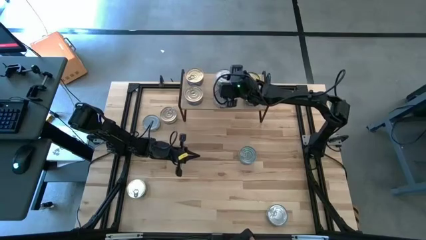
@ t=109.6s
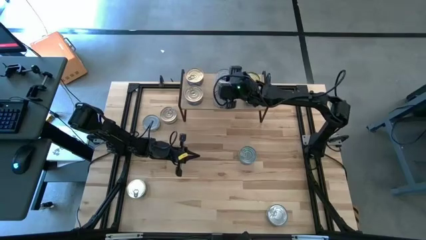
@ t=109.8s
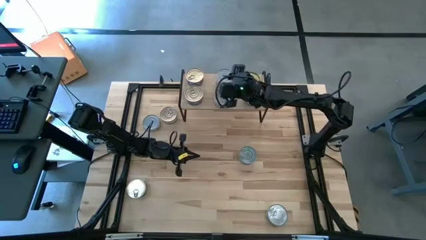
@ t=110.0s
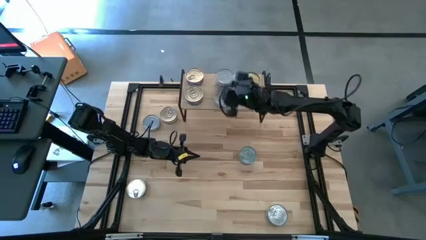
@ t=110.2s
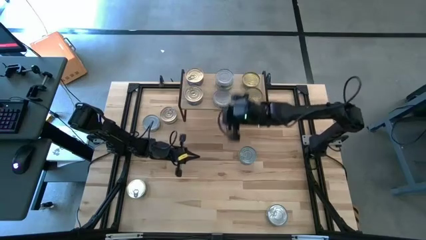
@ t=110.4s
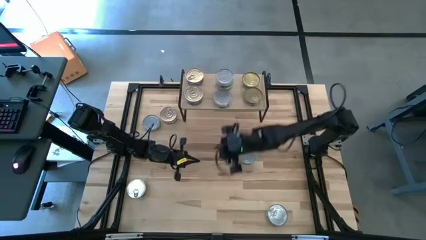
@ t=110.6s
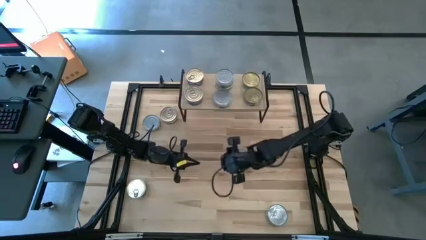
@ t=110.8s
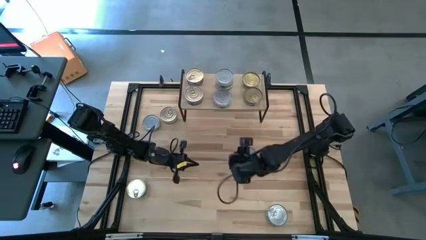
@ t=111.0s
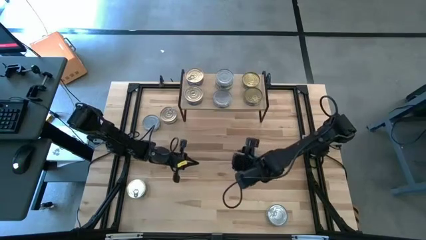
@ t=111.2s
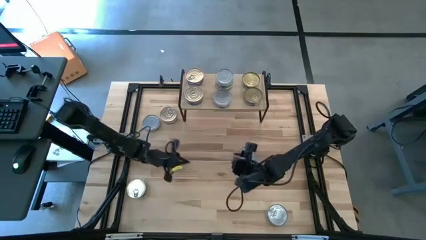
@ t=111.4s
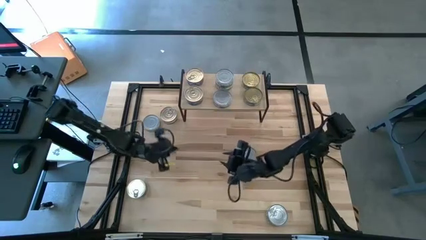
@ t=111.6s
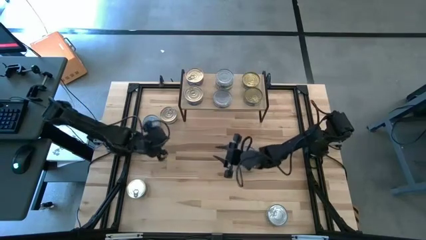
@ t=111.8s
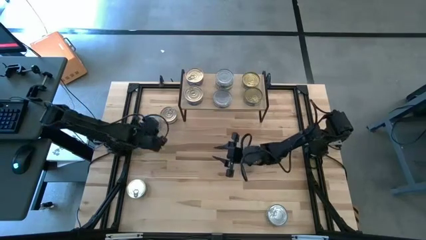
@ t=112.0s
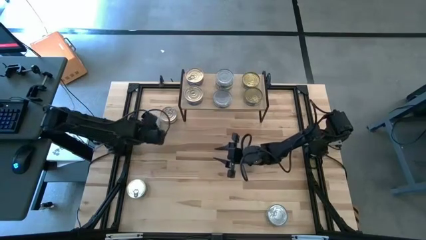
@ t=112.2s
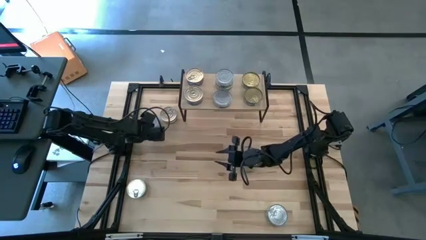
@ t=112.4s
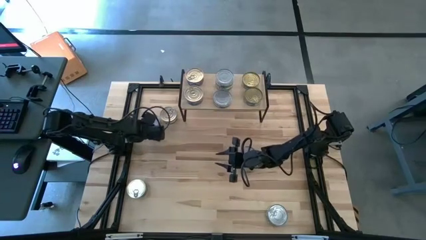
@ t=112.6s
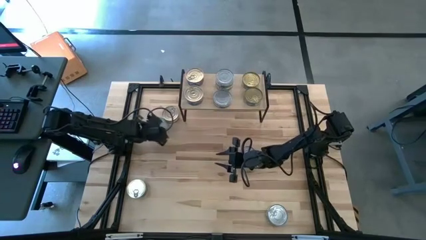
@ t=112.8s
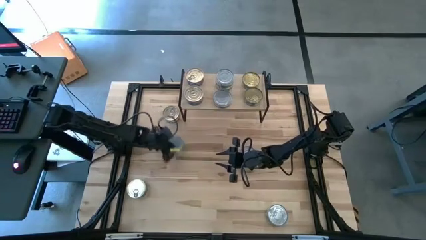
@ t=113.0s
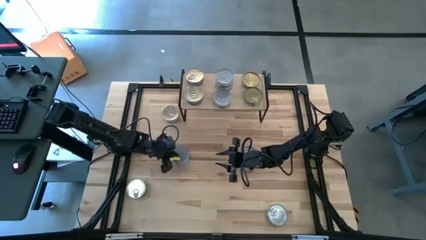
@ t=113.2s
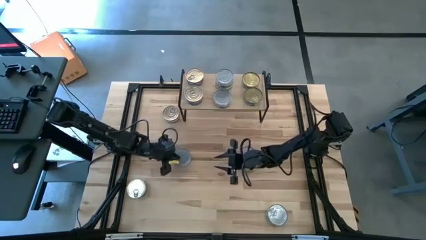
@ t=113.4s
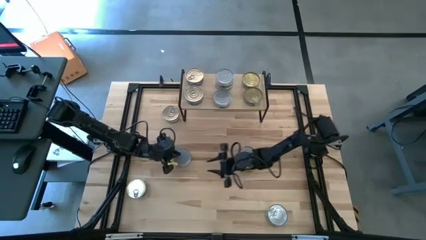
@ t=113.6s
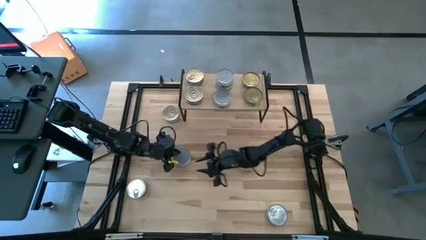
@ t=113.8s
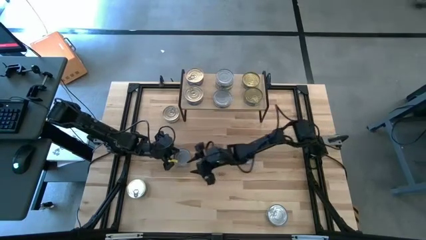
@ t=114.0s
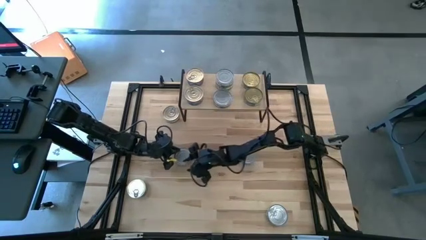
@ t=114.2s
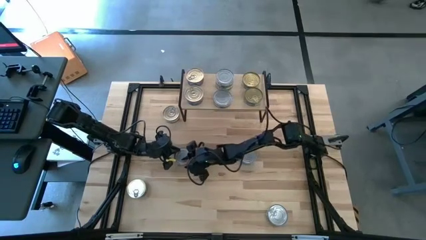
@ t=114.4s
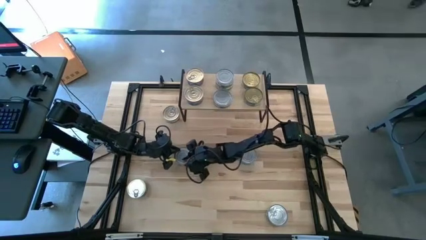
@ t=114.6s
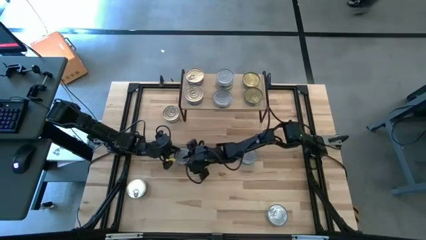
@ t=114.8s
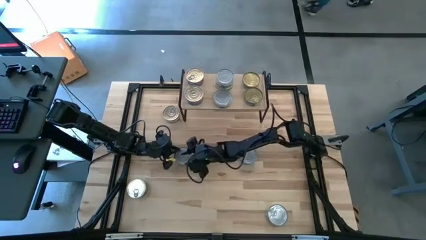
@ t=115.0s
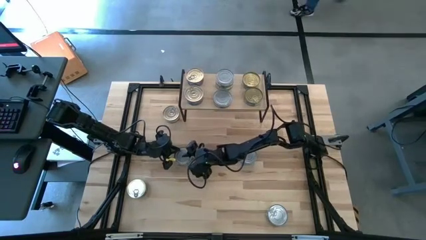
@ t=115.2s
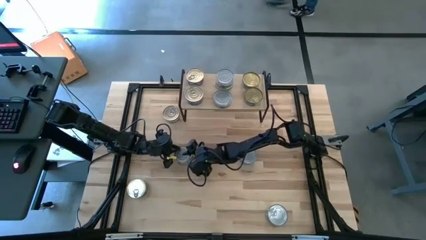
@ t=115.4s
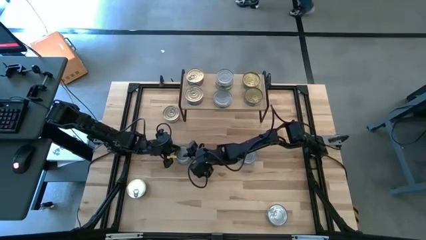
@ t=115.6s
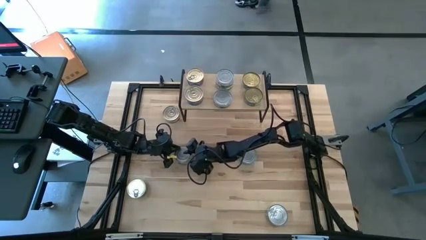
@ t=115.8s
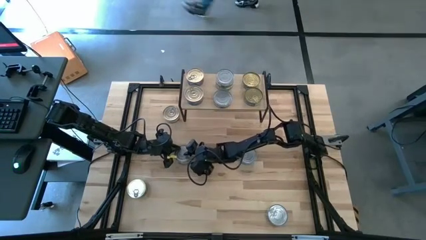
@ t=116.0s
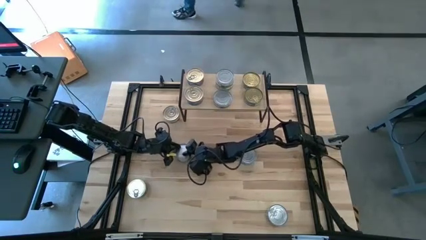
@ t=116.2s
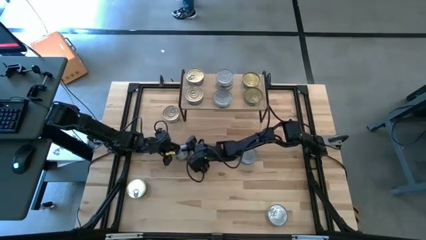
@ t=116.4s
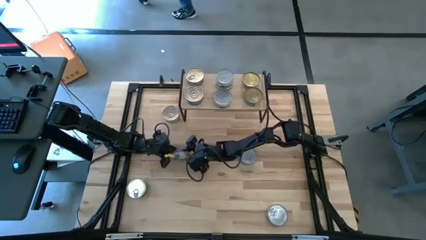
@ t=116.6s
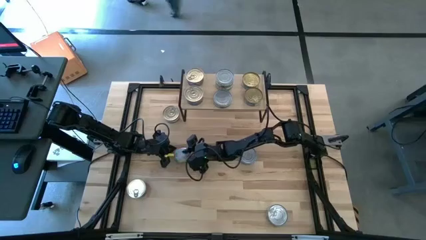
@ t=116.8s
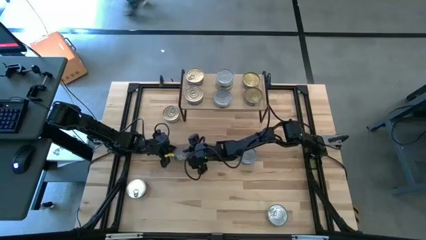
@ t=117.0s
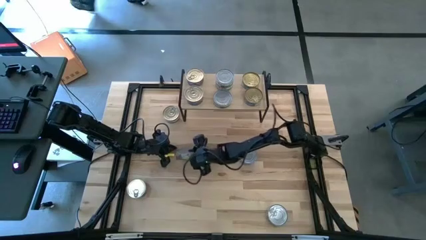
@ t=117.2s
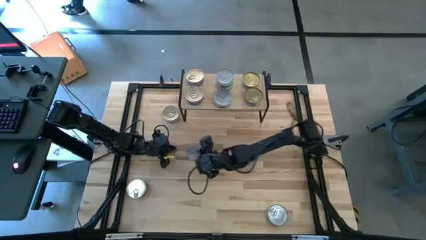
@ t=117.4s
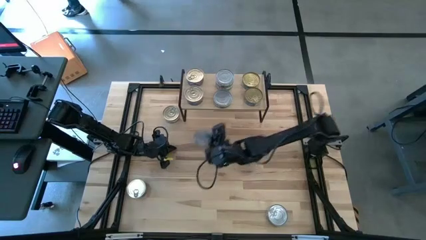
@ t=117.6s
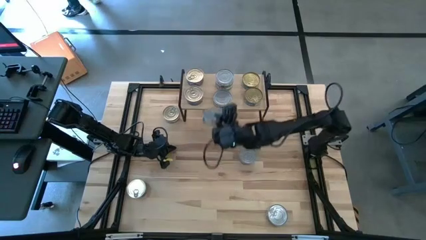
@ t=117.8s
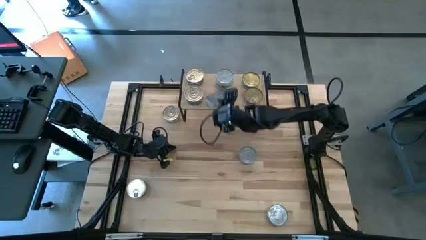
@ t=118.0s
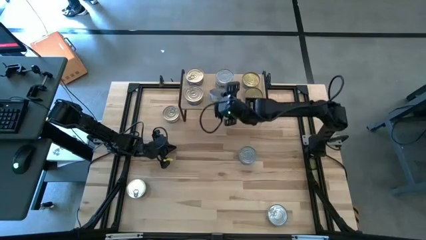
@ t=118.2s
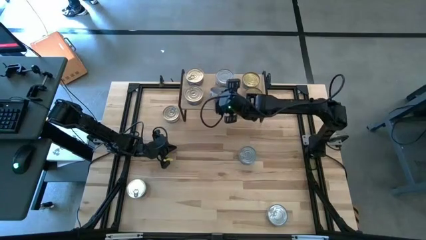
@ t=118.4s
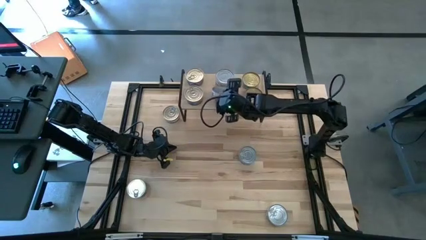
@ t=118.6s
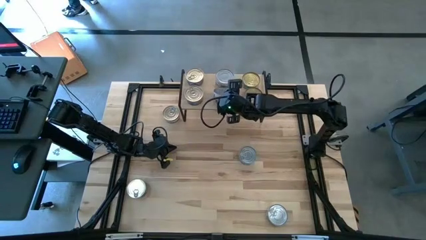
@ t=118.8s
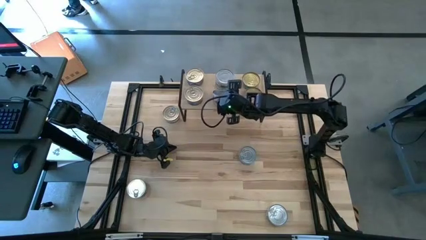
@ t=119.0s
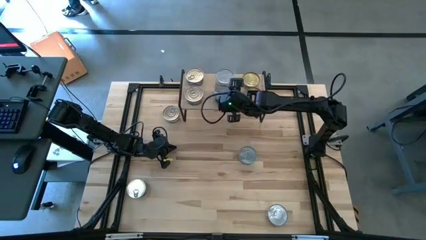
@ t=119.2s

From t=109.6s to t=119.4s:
Task: Stack canned seafood by type on shelf
Stack the green can on top of the other green tuna can

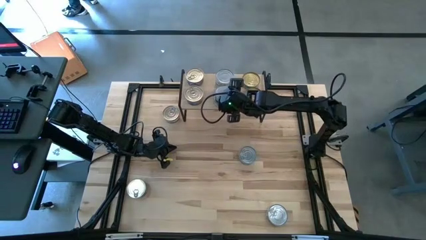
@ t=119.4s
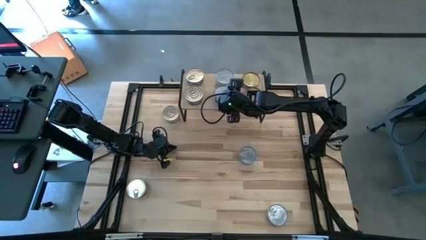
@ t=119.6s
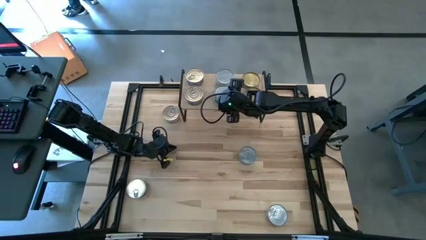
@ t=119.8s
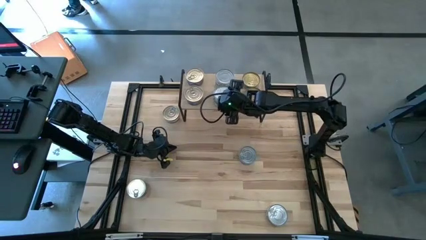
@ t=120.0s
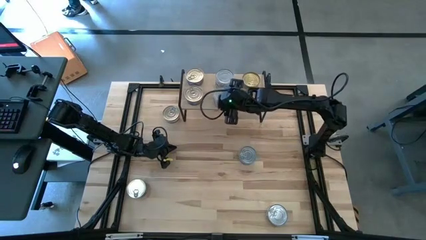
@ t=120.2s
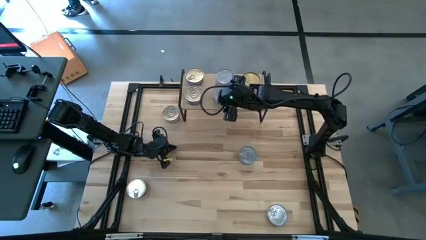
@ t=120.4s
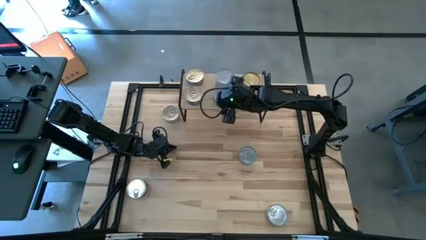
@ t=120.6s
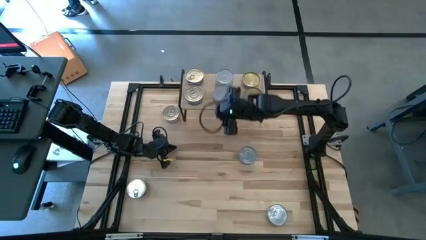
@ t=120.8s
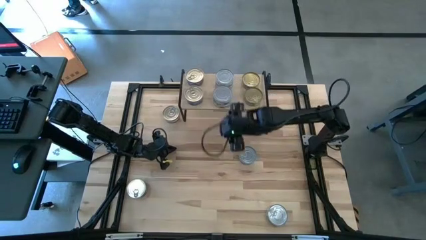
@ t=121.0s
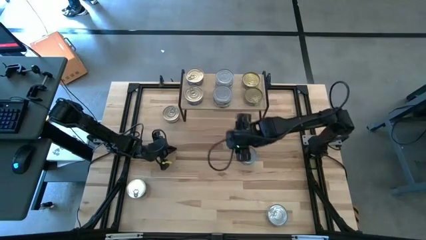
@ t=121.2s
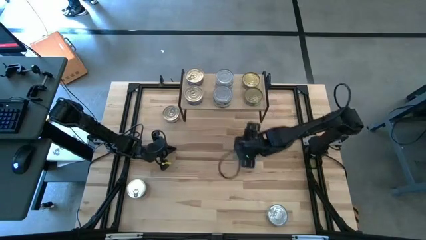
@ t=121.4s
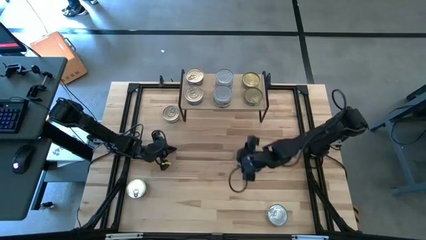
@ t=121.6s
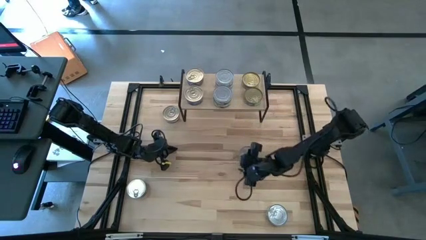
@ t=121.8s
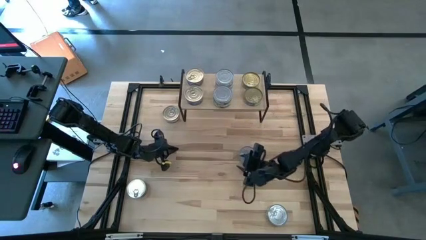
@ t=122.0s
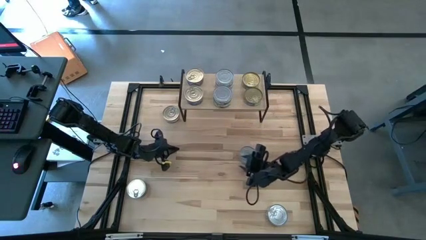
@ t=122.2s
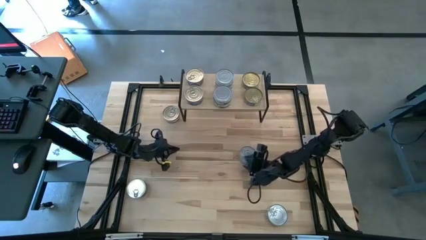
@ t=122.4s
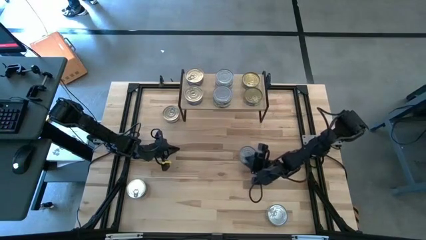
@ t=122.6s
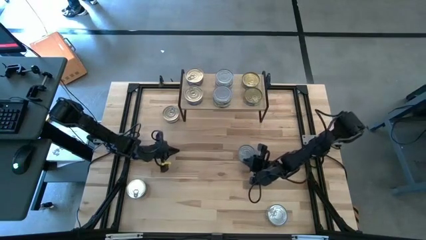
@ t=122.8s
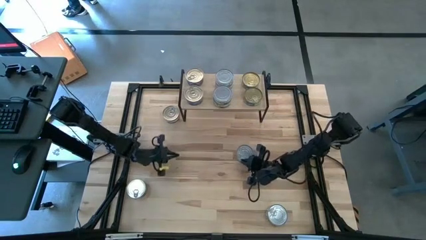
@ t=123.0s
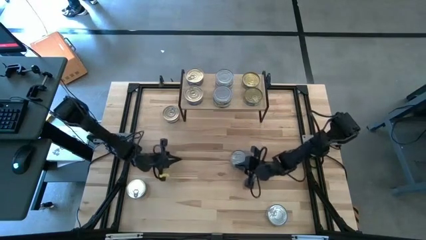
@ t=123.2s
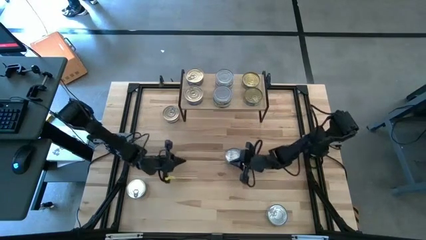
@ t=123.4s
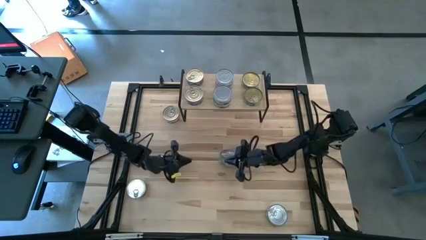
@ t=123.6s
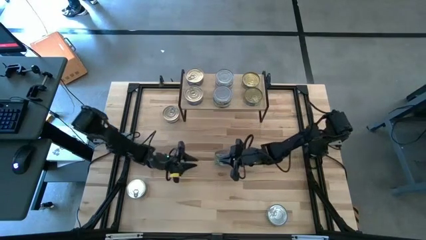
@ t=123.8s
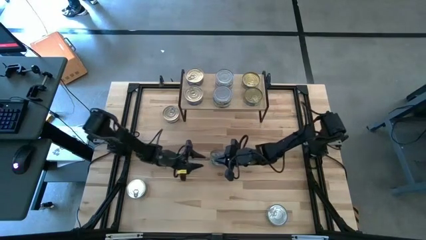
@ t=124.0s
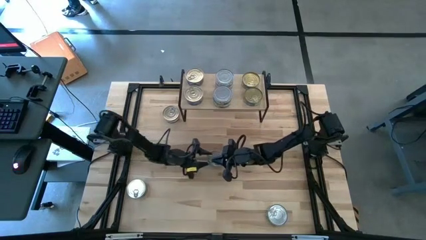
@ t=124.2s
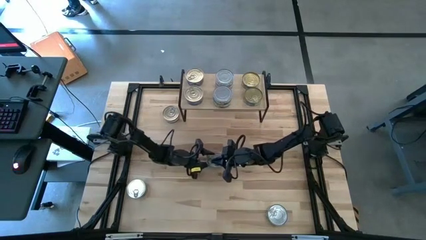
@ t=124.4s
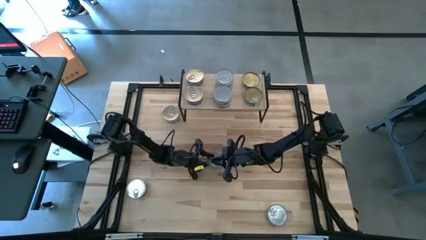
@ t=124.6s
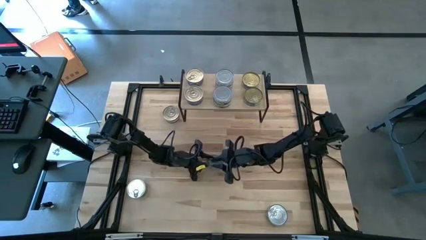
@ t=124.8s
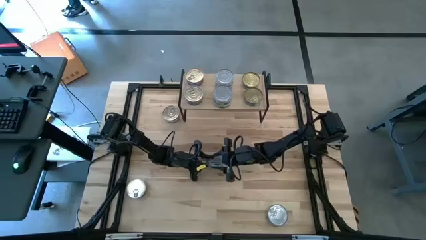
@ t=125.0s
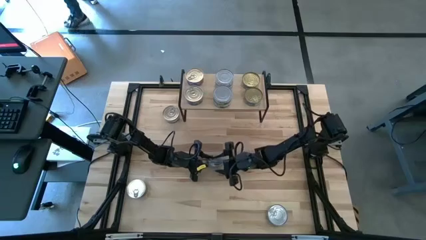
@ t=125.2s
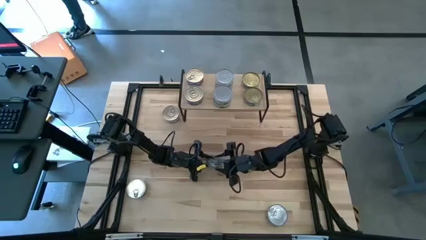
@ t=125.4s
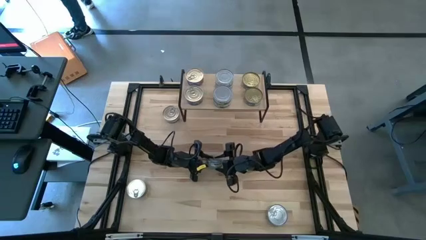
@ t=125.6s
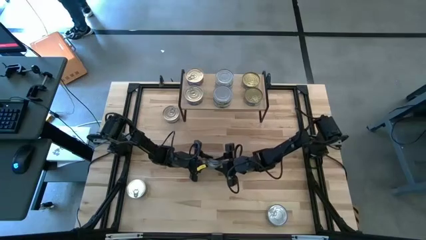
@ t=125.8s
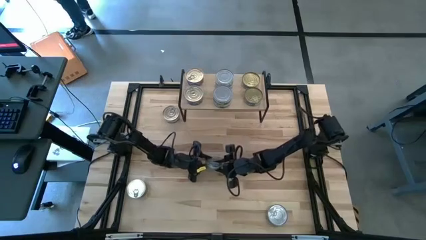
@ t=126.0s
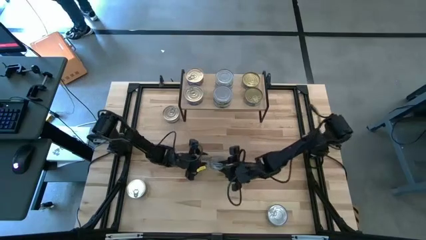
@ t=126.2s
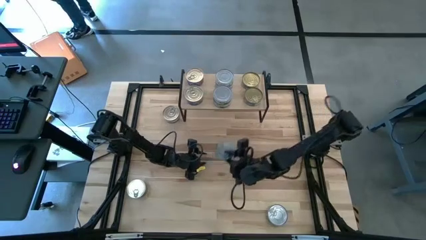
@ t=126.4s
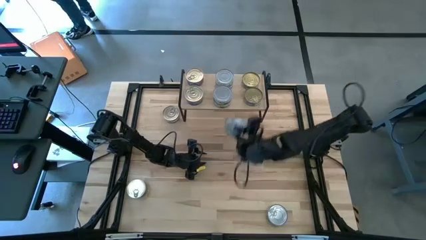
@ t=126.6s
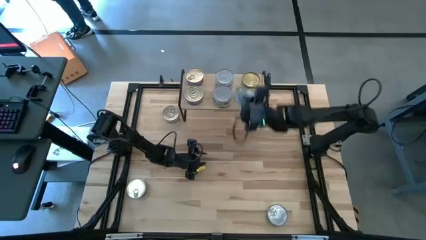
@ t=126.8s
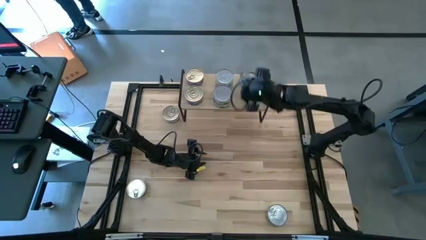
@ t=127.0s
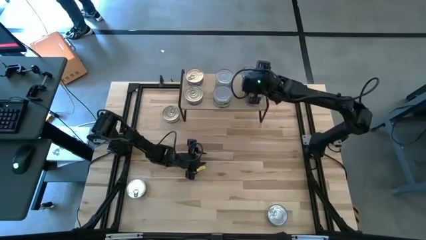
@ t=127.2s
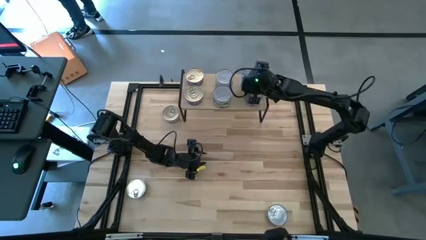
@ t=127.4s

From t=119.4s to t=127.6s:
Stack the green with blue patterned can on top of the green with blue patterned tuna can
